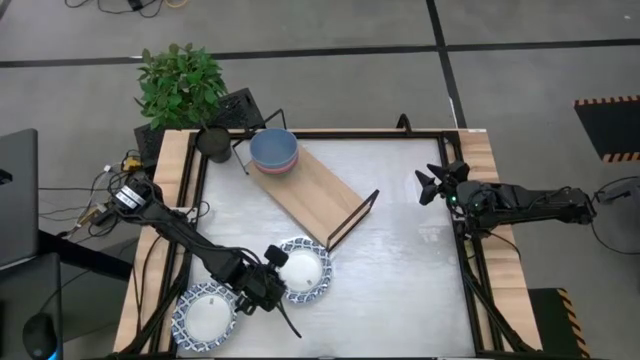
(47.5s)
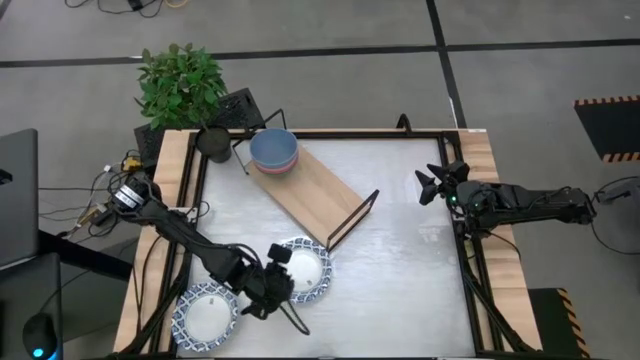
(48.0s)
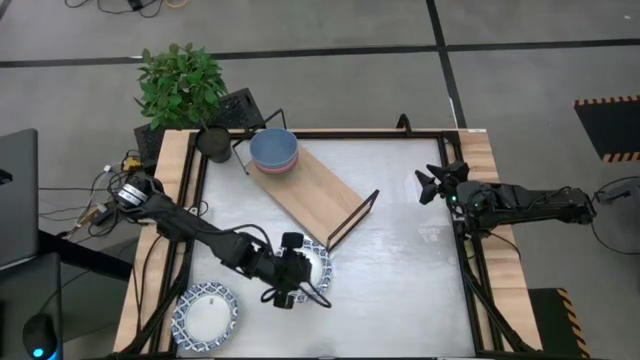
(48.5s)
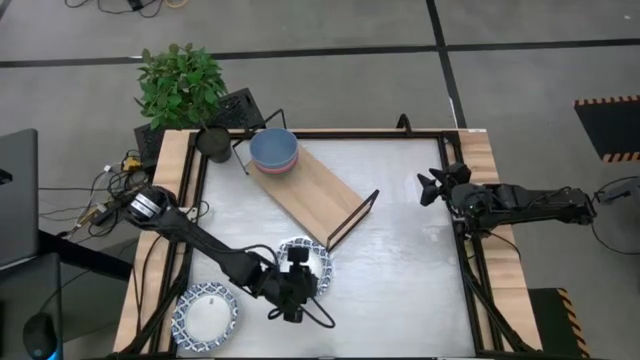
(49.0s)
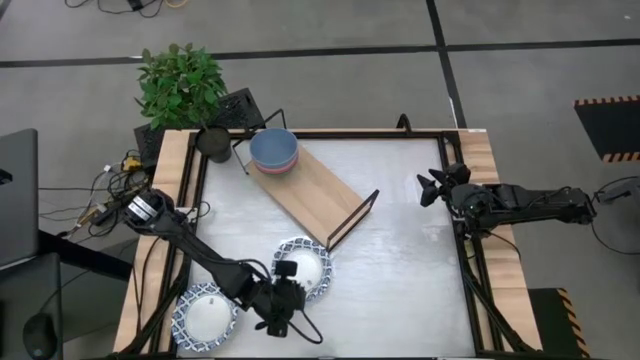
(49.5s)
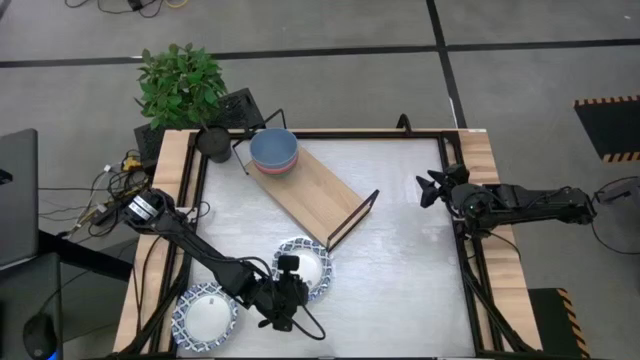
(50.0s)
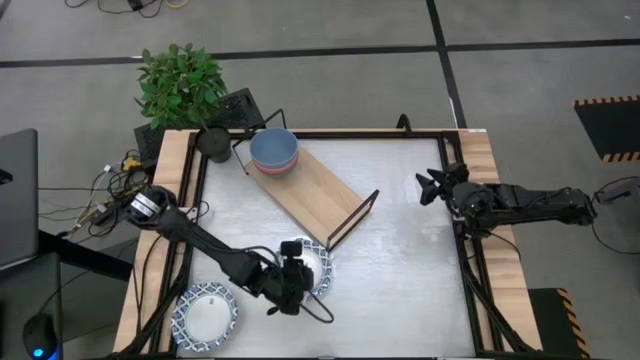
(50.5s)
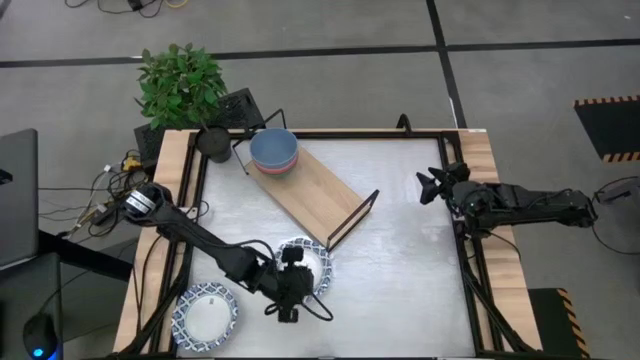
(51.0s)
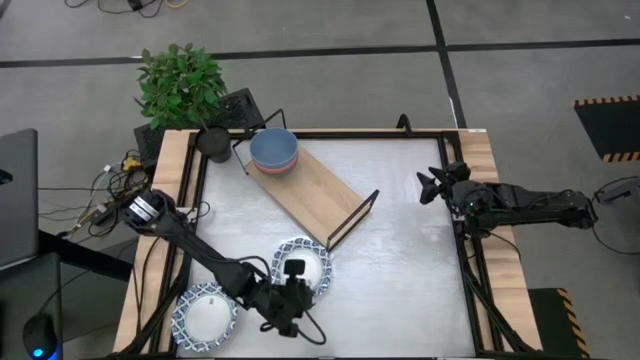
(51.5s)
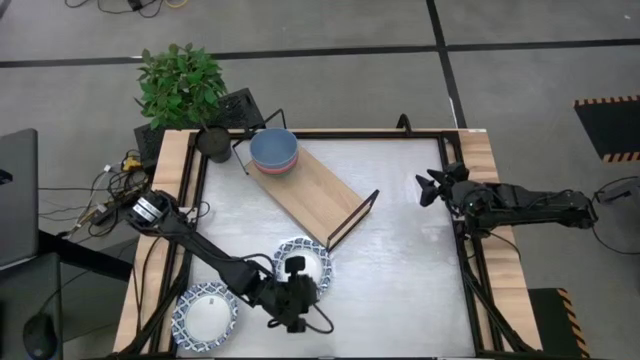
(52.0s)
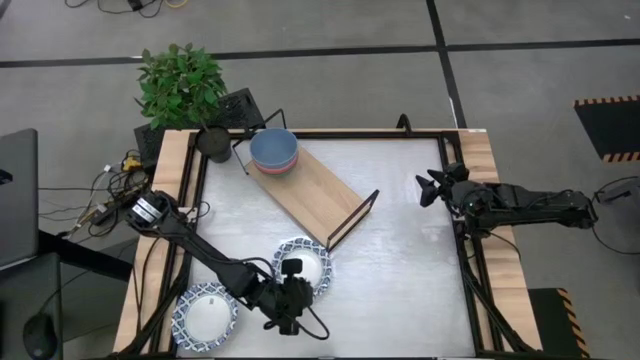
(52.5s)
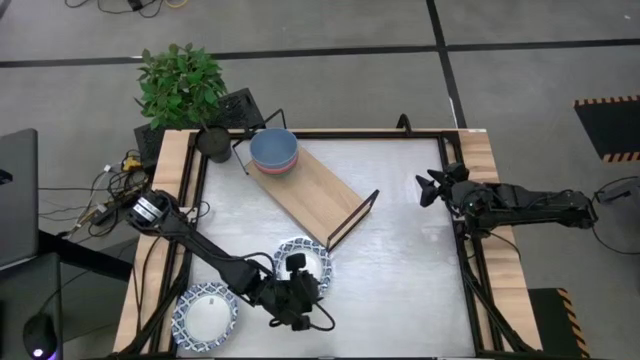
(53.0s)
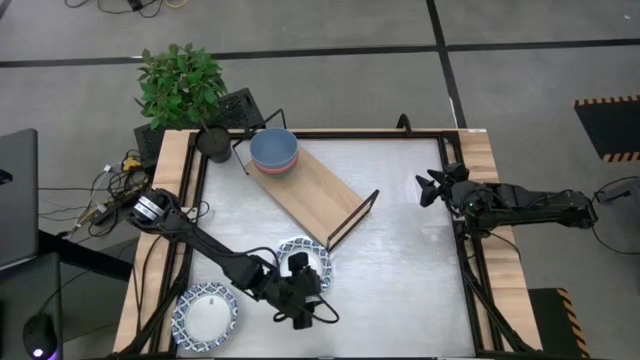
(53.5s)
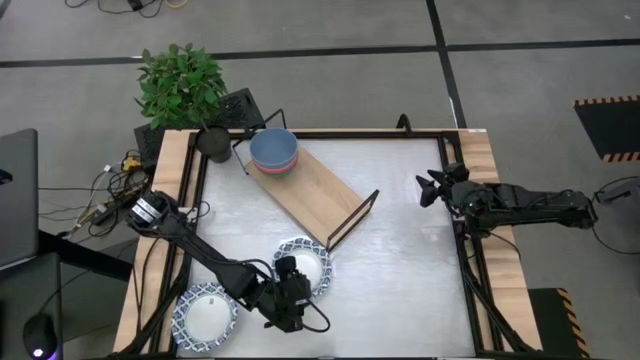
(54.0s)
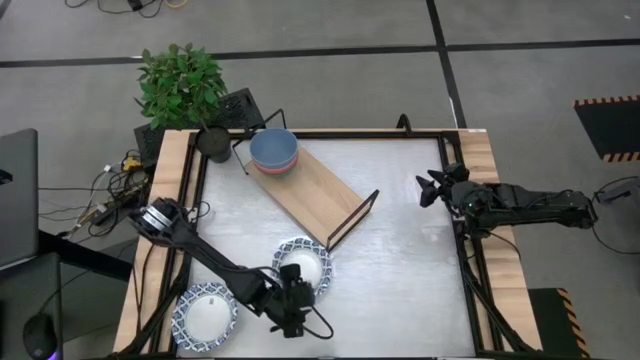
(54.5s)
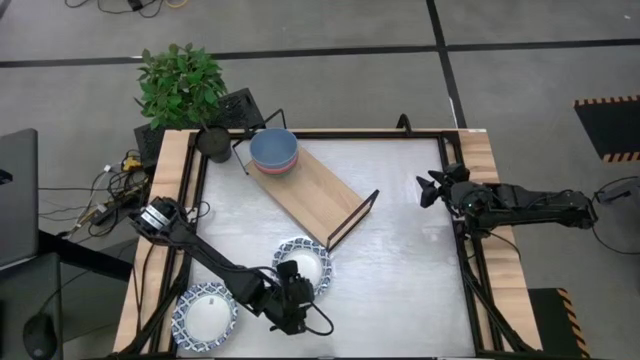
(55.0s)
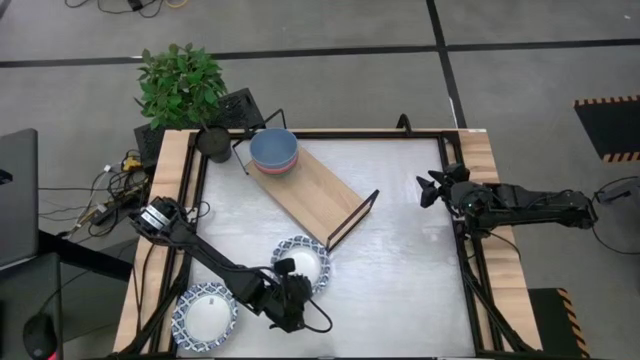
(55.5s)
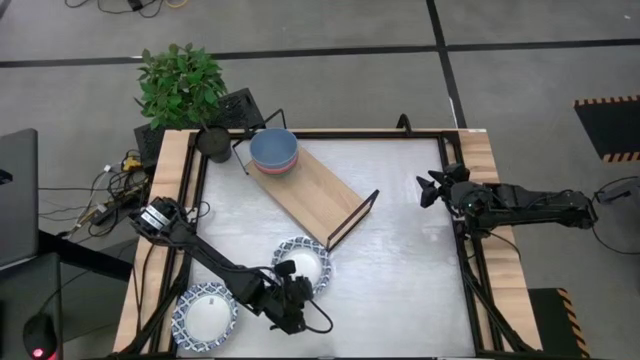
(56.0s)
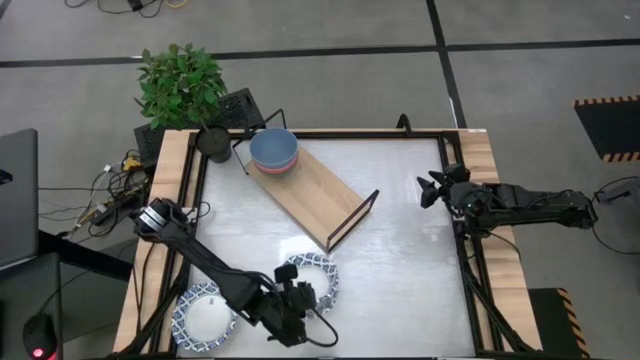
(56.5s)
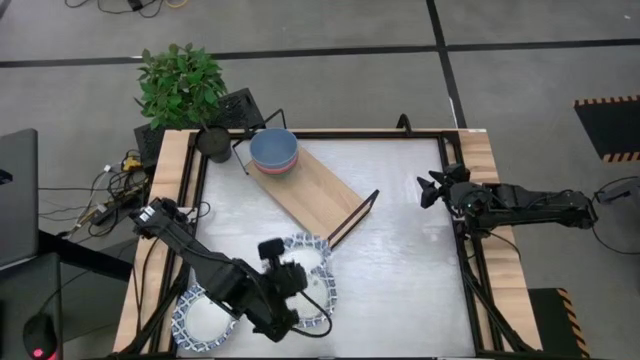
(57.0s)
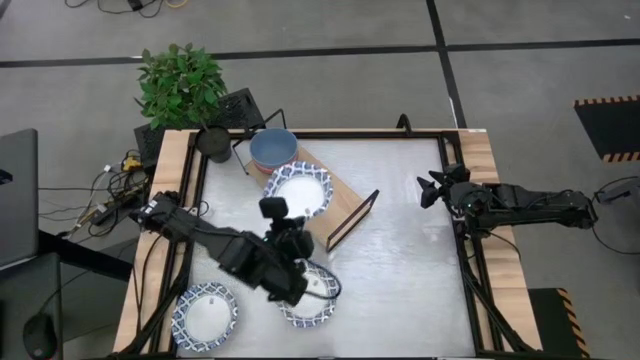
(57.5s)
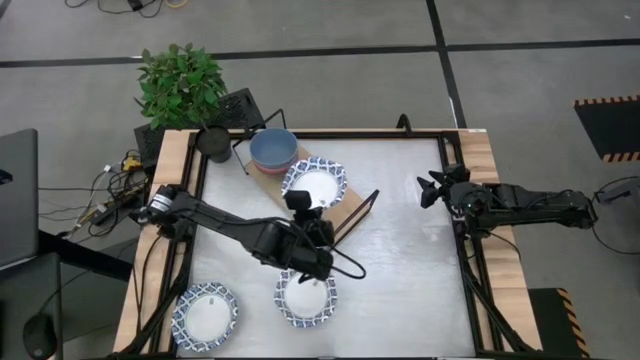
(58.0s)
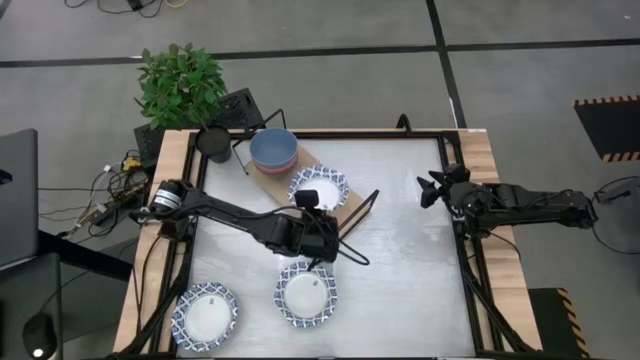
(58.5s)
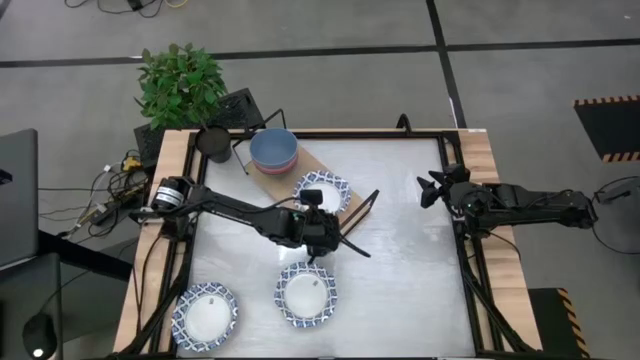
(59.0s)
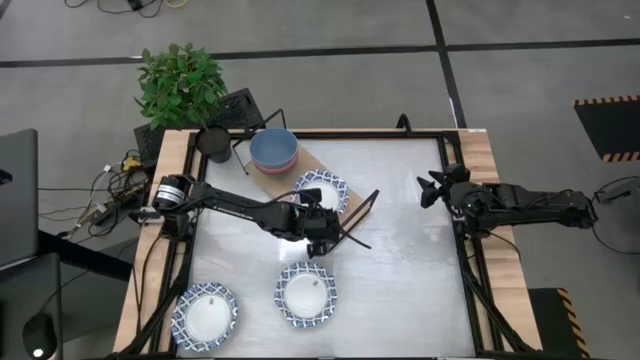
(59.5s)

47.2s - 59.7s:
Task: Place and stack bowls onto a shelf
Put the top right patterned blue bowl on the shelf

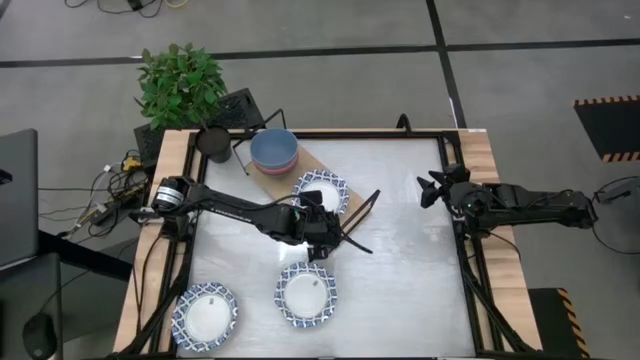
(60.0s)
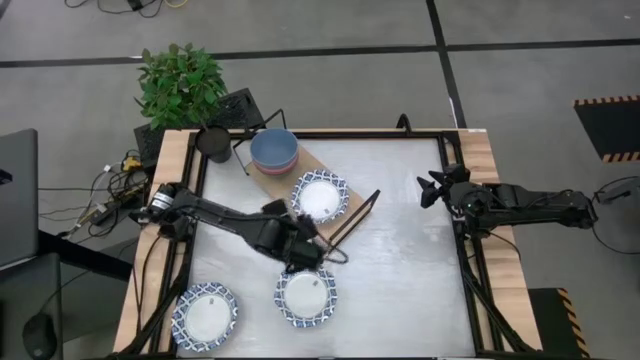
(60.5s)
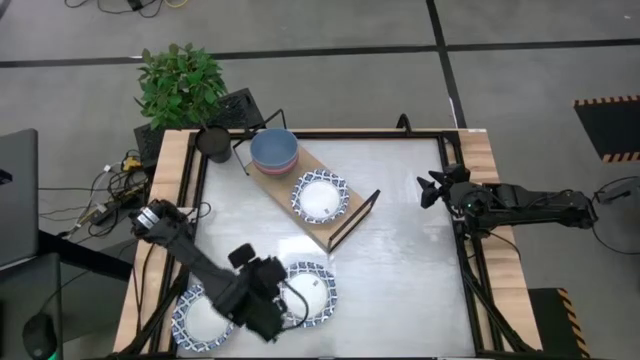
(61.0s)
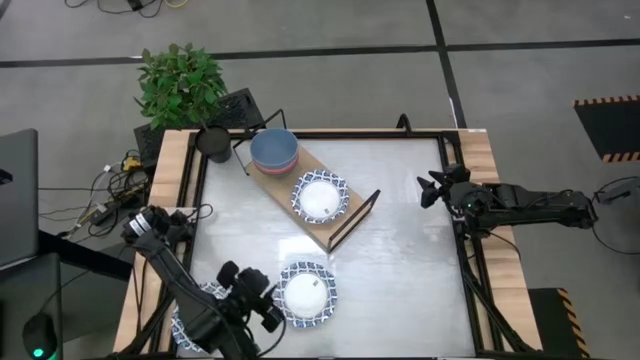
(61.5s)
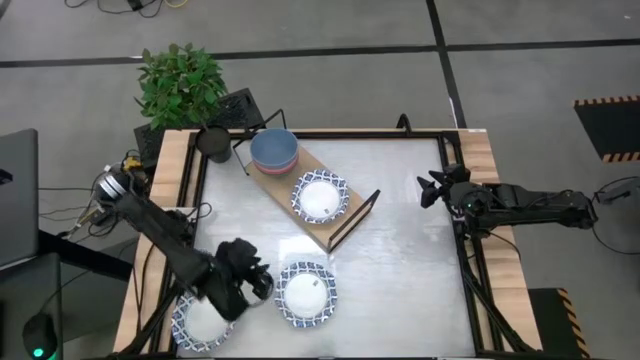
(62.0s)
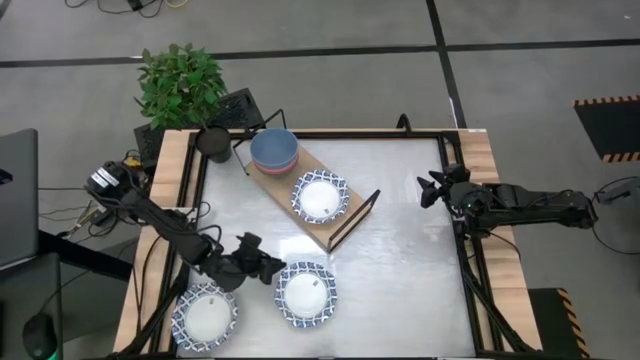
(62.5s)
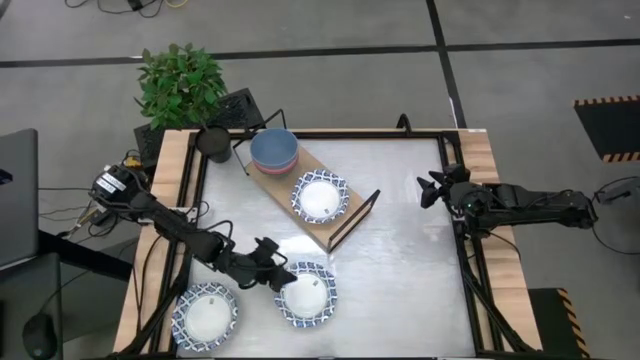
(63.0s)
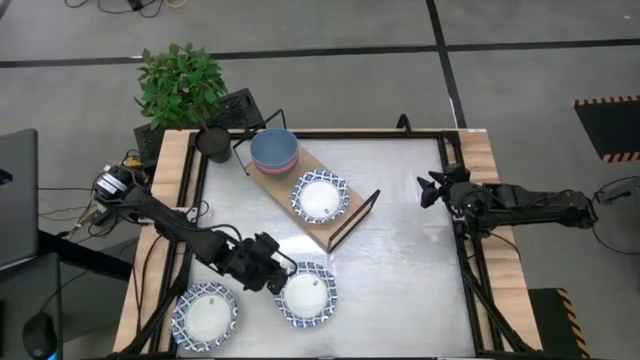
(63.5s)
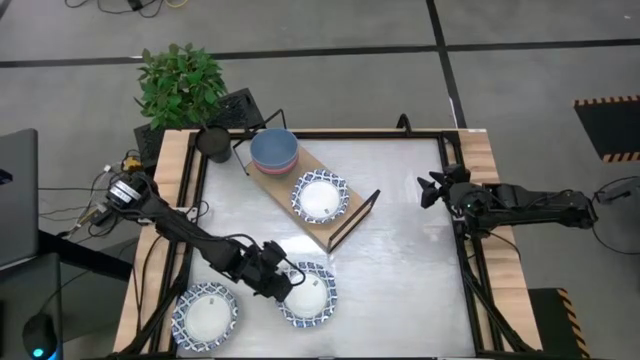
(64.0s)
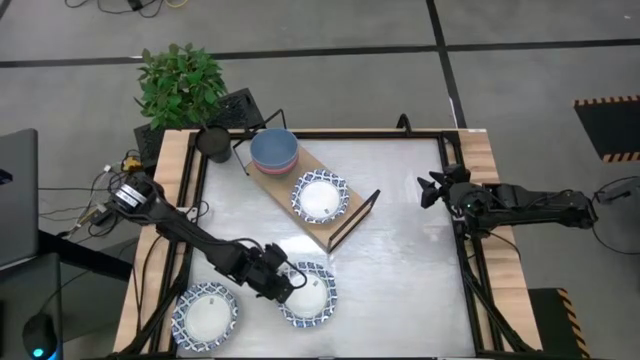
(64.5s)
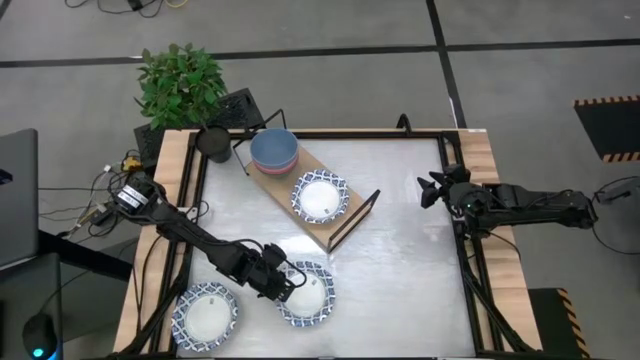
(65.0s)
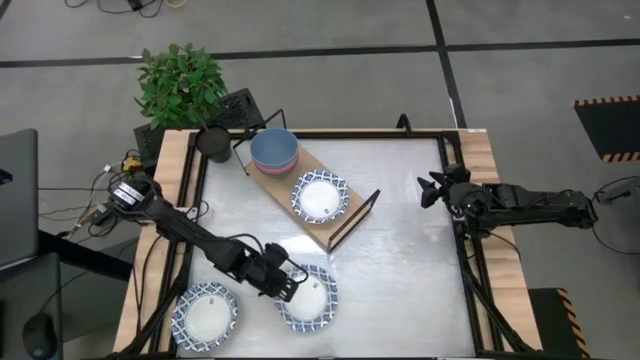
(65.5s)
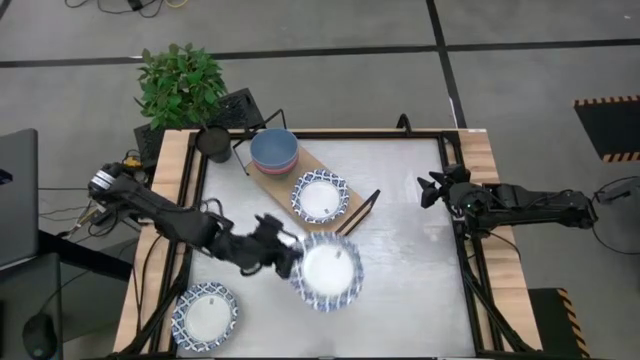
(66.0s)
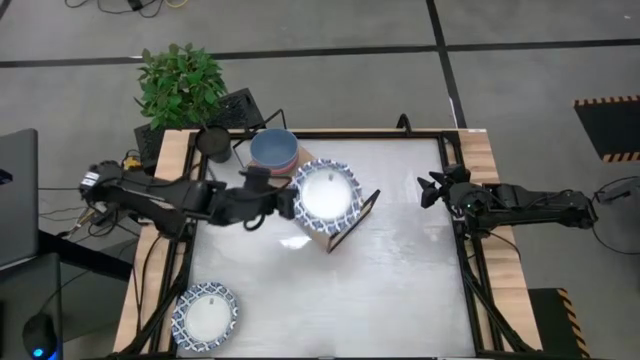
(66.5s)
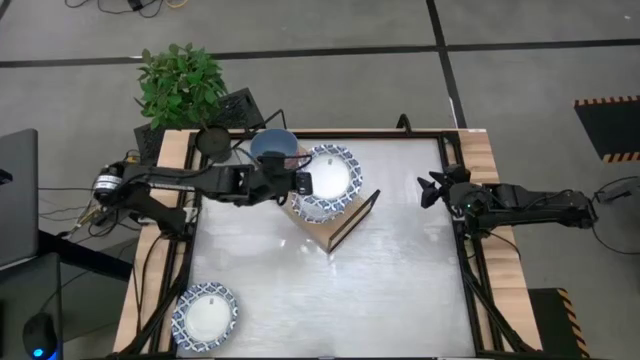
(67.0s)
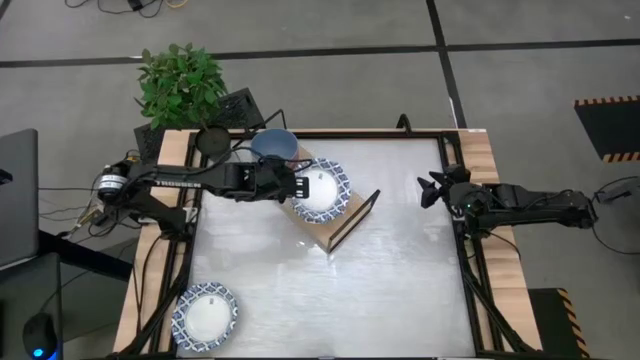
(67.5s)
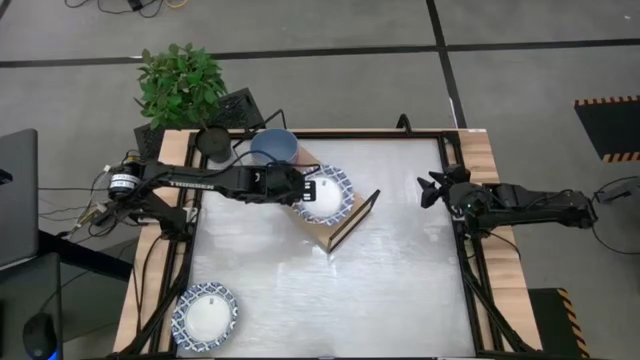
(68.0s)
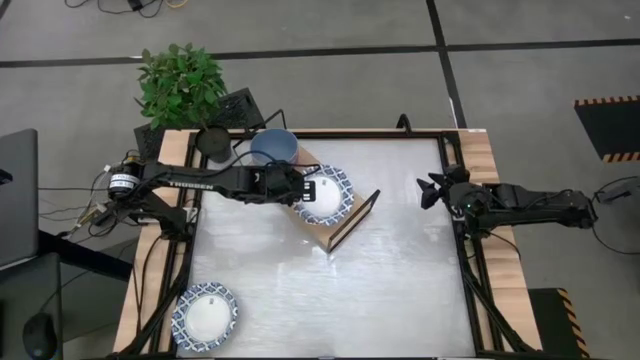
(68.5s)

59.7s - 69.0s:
Stack the bottom right patterned blue bowl on the patterned blue bowl on the shelf

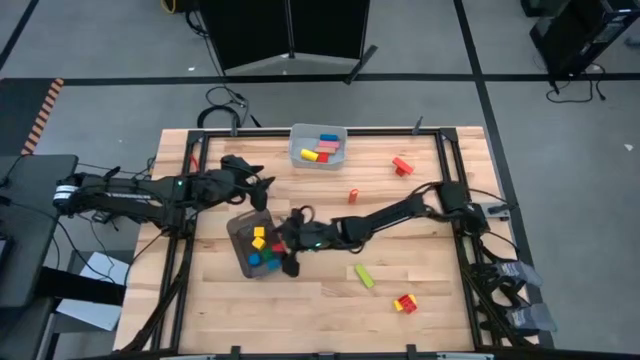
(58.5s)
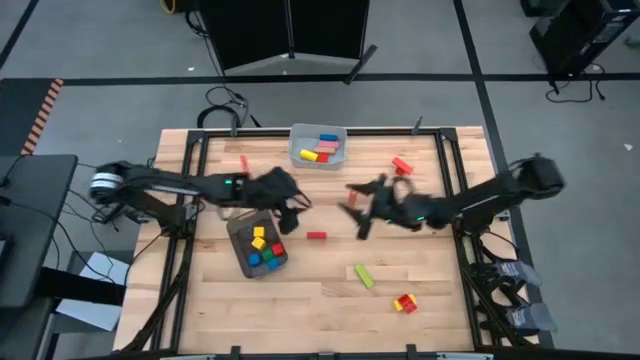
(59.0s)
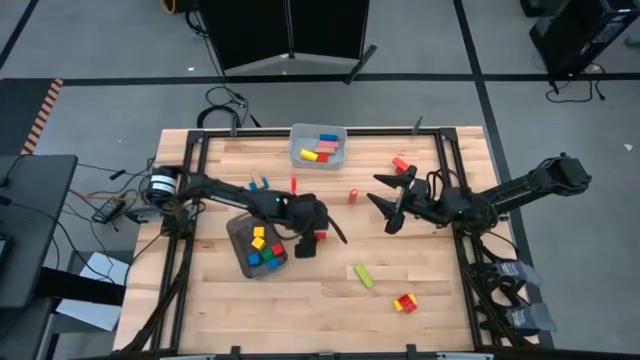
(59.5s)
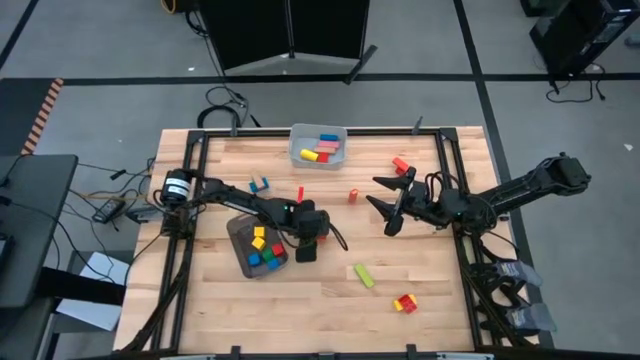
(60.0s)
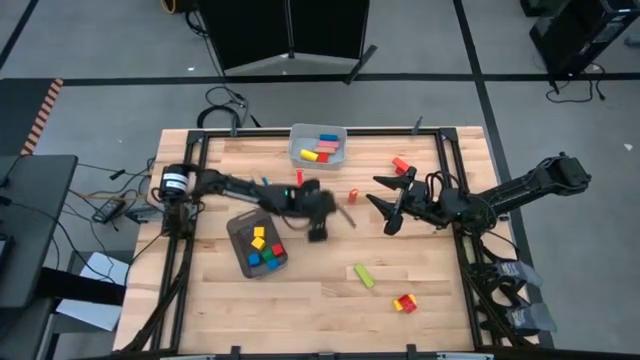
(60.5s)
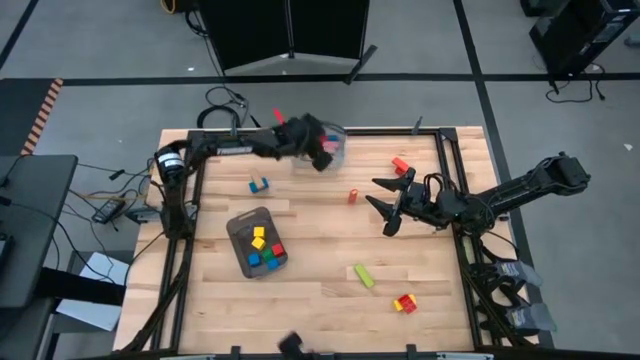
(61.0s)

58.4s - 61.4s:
Task: Sort blocks by size
Put the red rectangular block into the gray bin
